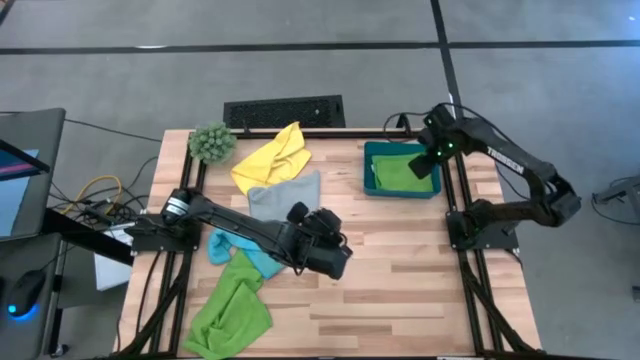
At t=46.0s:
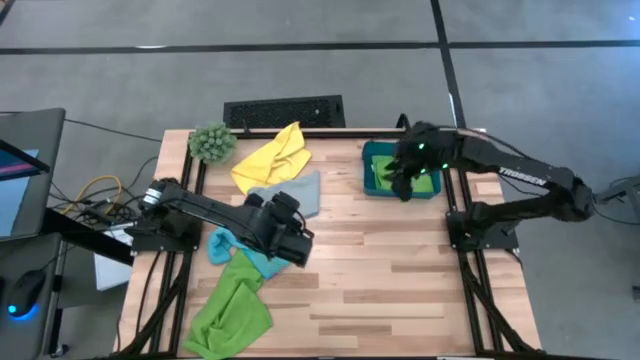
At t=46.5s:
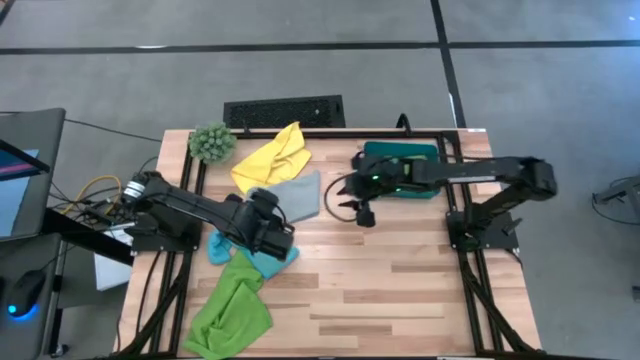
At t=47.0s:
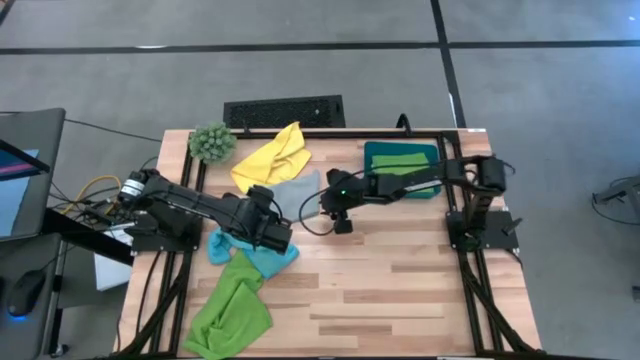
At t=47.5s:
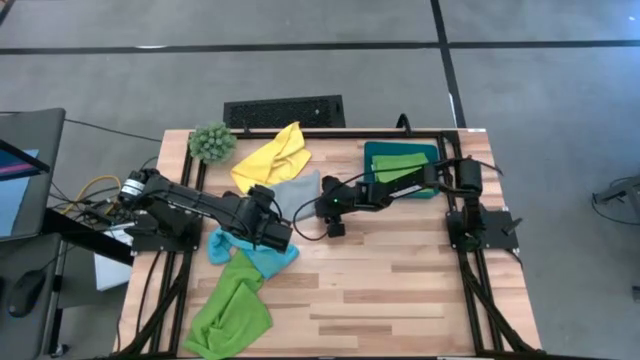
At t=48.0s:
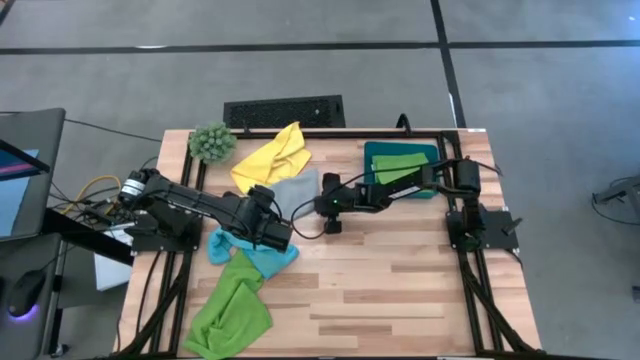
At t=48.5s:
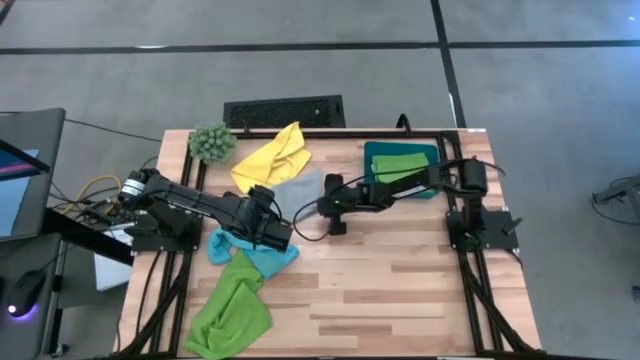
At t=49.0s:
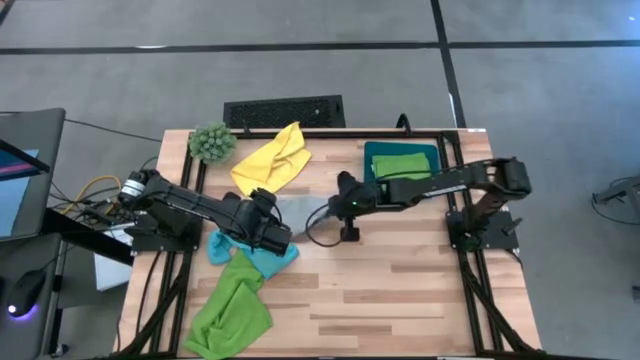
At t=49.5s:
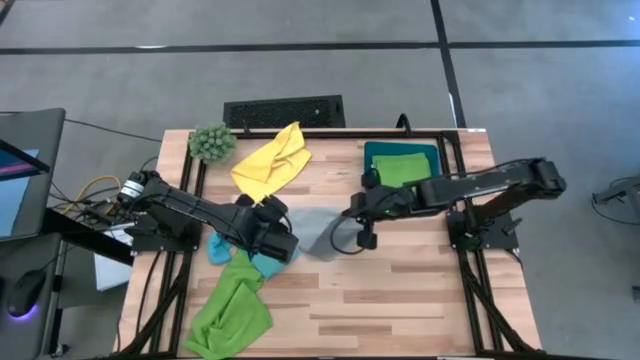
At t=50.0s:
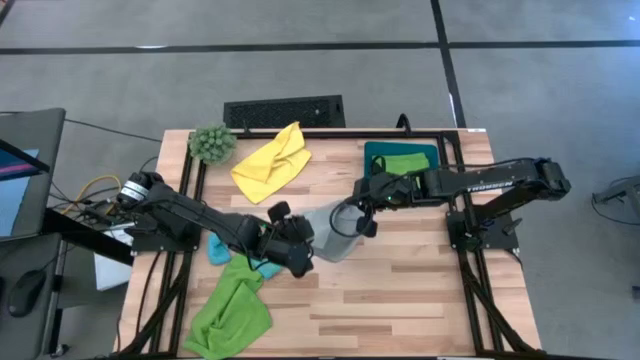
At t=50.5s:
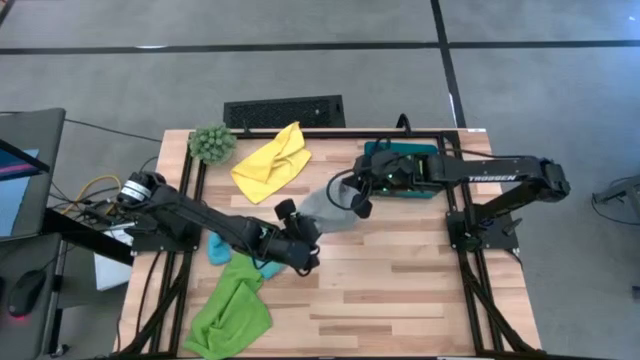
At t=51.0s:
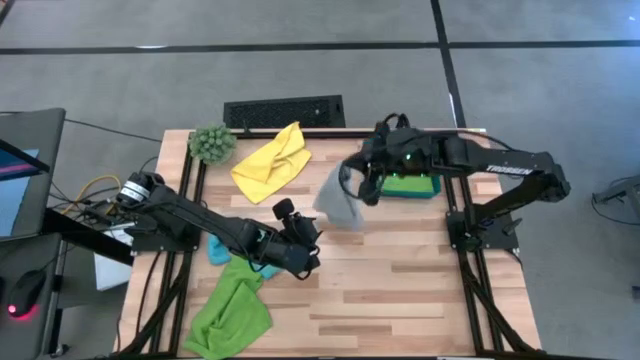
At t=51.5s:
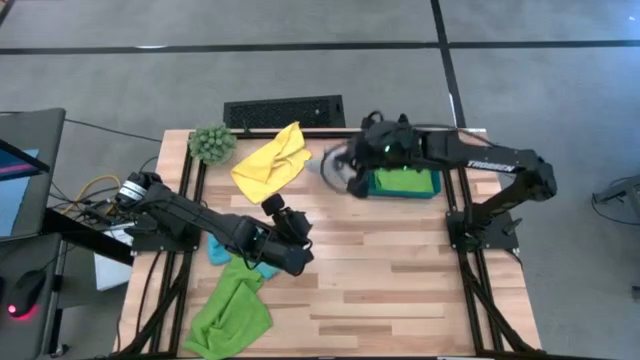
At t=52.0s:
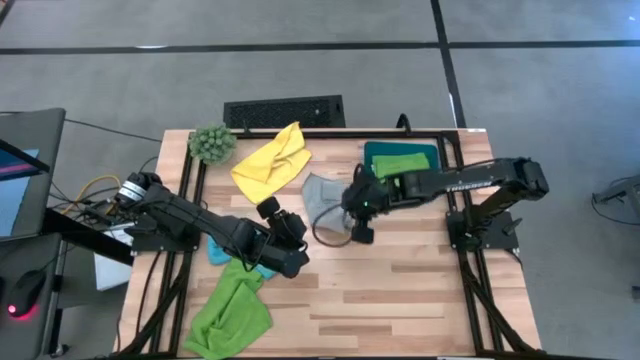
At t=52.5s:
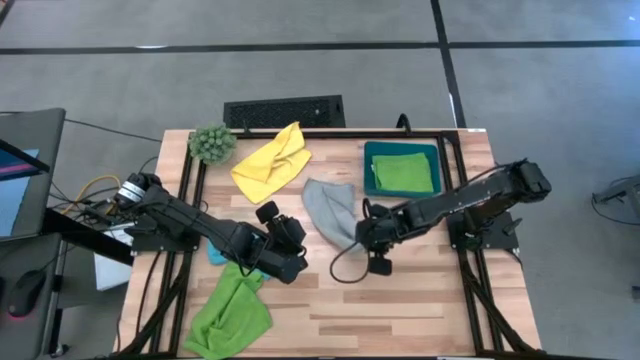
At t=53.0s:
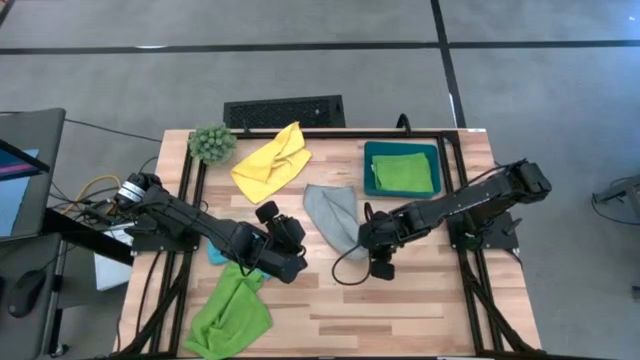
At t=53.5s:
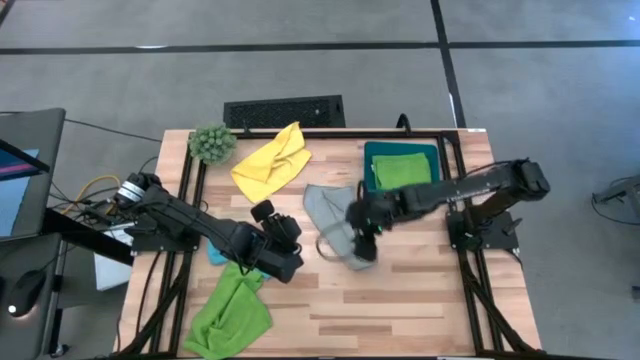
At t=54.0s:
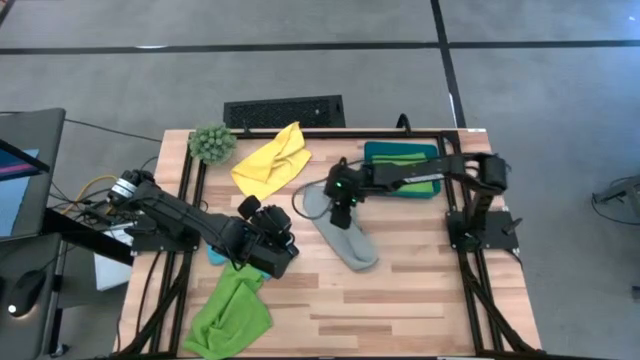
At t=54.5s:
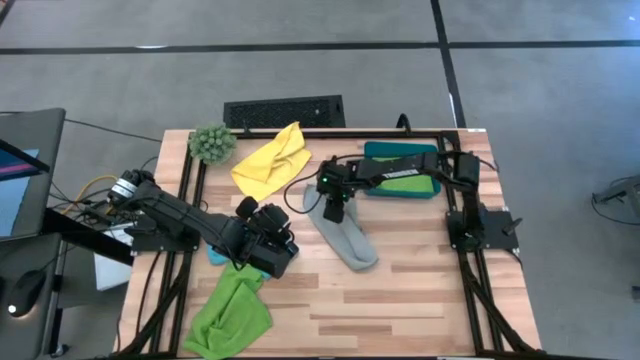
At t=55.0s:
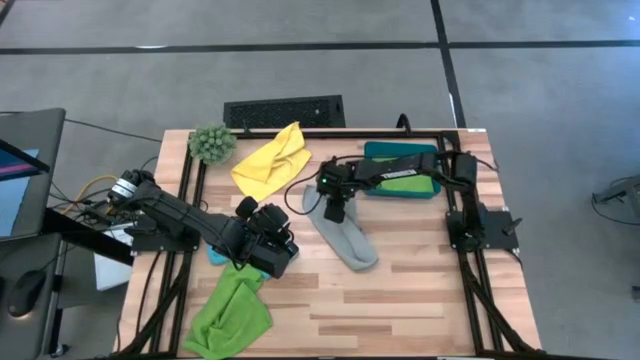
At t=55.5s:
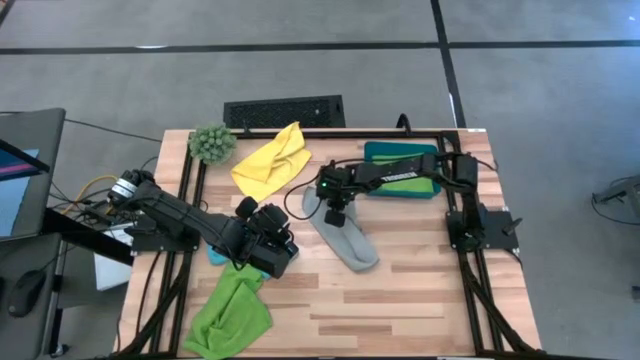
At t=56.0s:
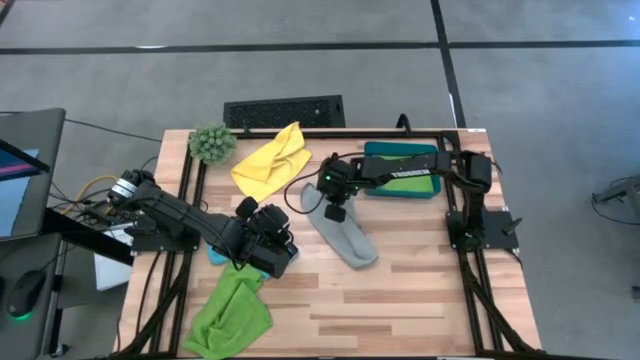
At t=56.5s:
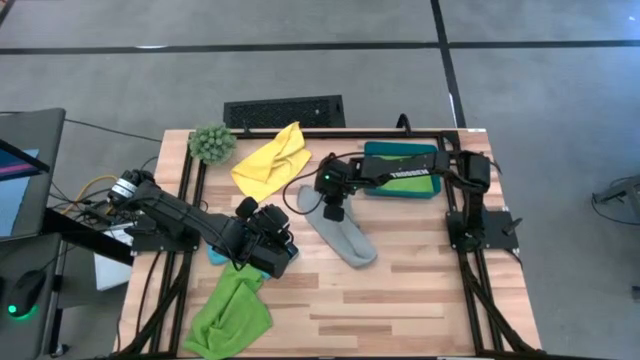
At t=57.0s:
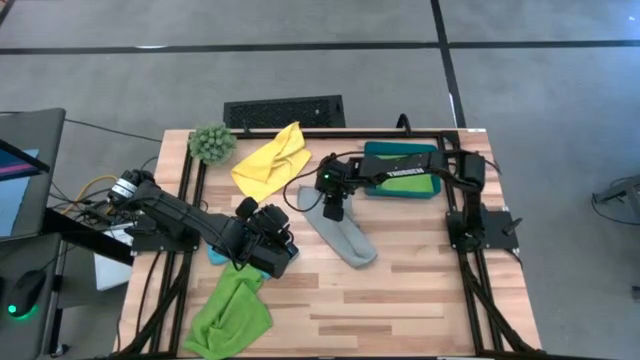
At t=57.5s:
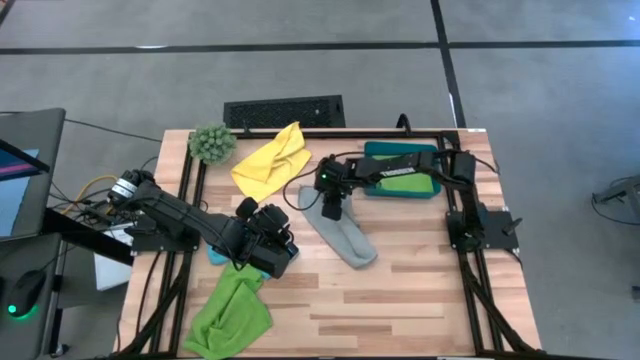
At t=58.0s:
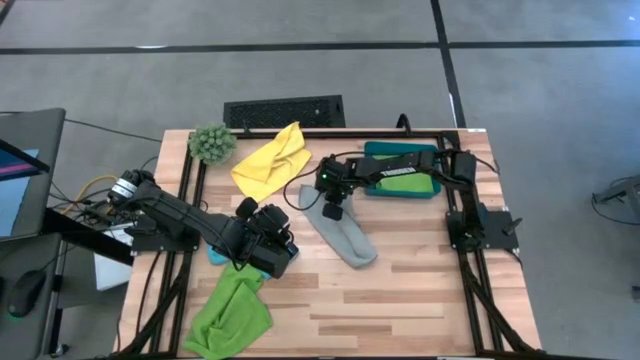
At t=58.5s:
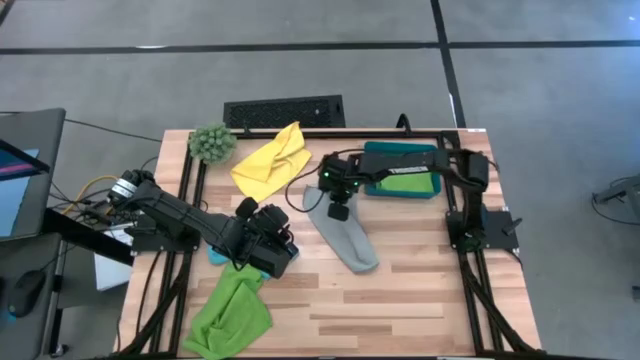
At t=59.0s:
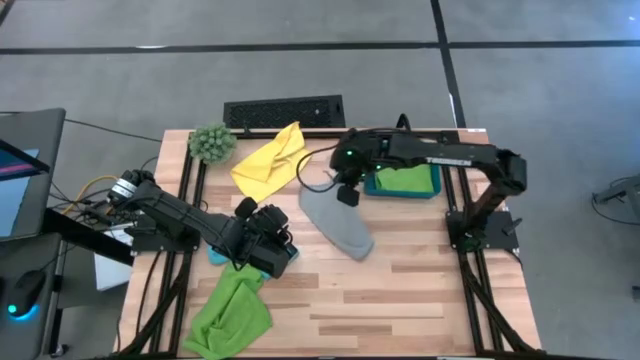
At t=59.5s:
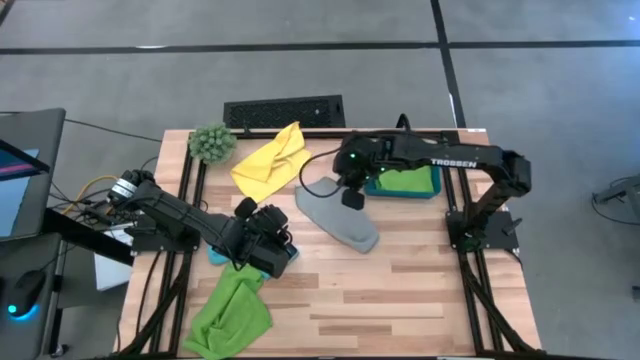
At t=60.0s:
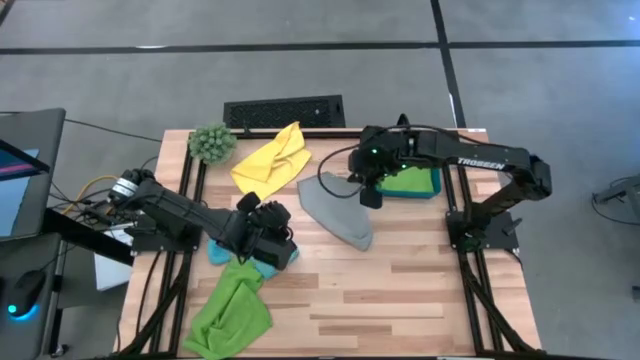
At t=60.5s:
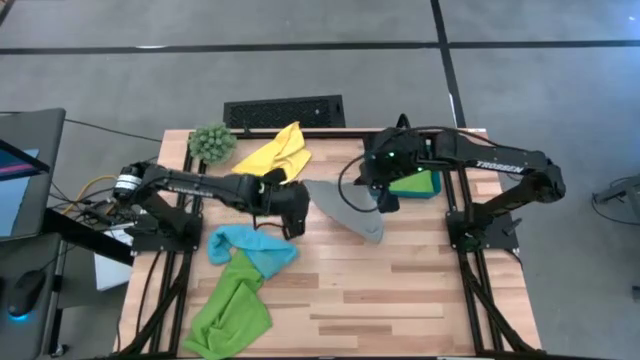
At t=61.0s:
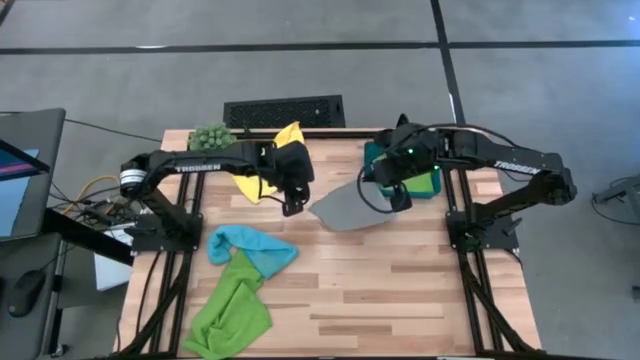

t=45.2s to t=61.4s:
Task: Fold microfiber towels
Fold the dark white microfiber cloth

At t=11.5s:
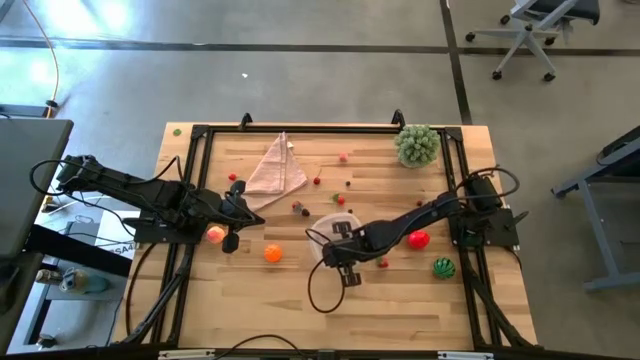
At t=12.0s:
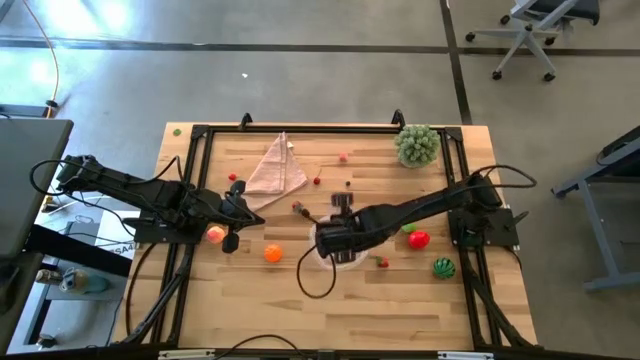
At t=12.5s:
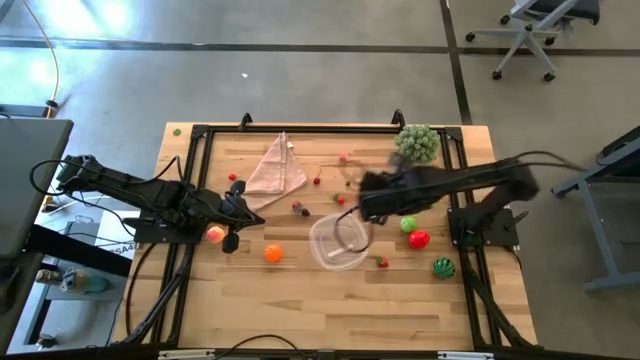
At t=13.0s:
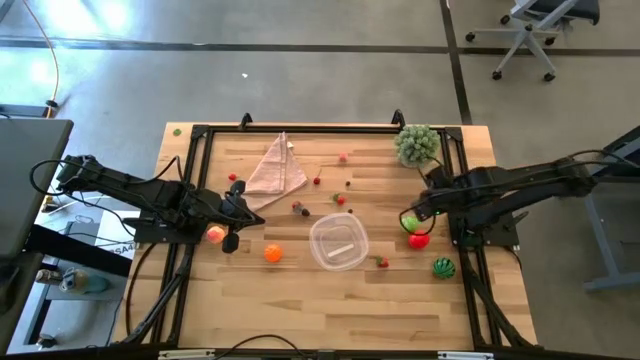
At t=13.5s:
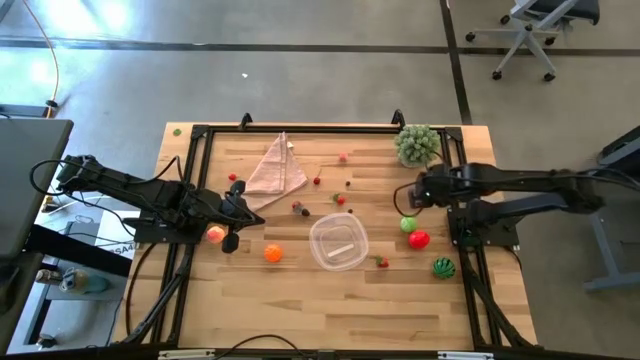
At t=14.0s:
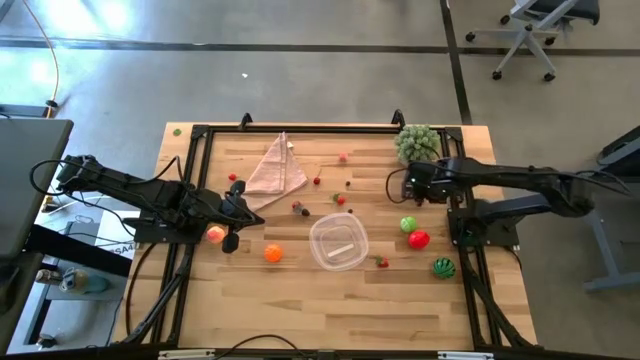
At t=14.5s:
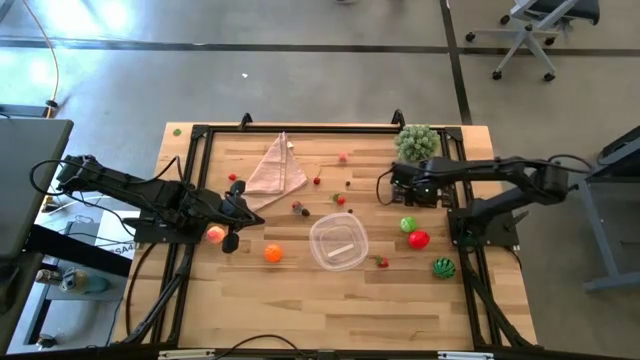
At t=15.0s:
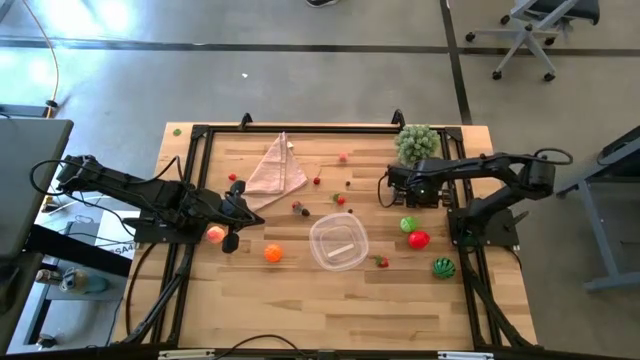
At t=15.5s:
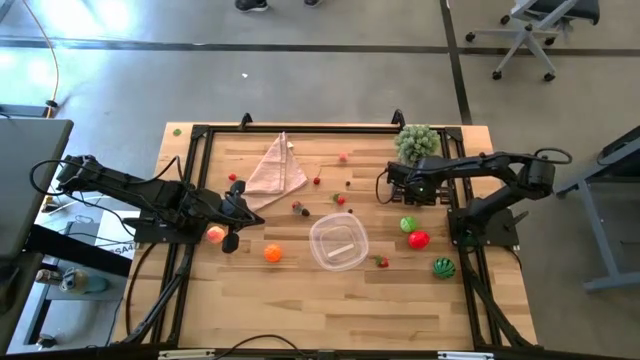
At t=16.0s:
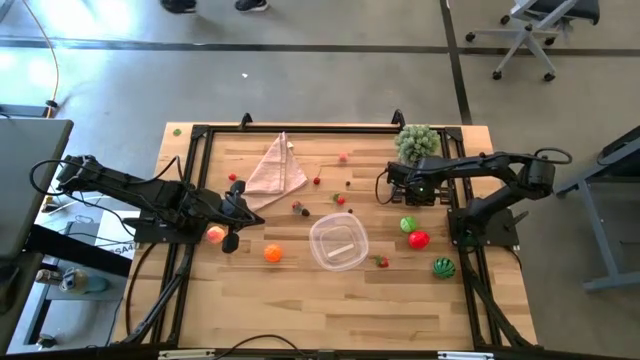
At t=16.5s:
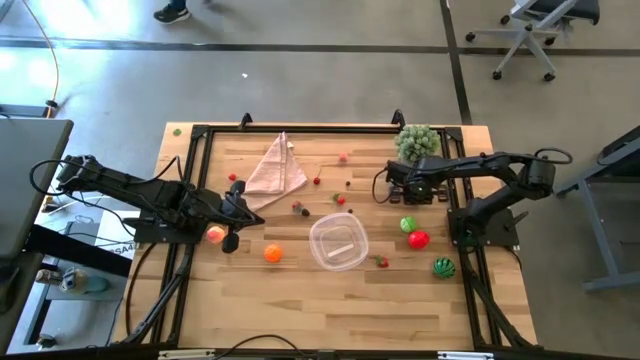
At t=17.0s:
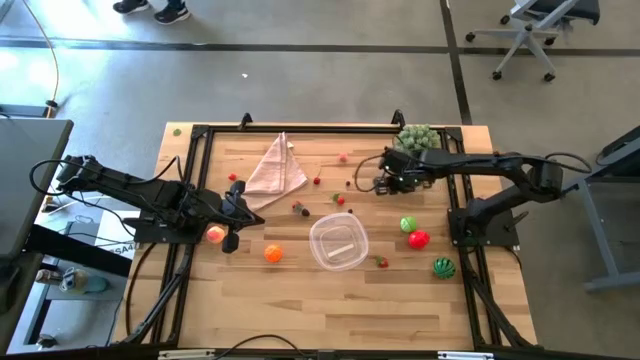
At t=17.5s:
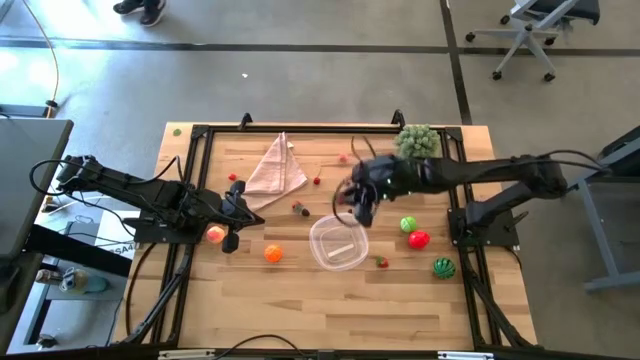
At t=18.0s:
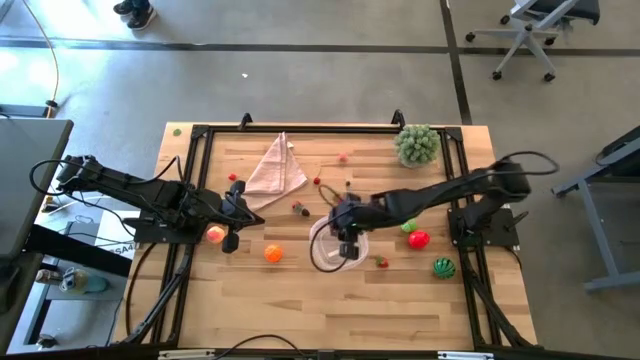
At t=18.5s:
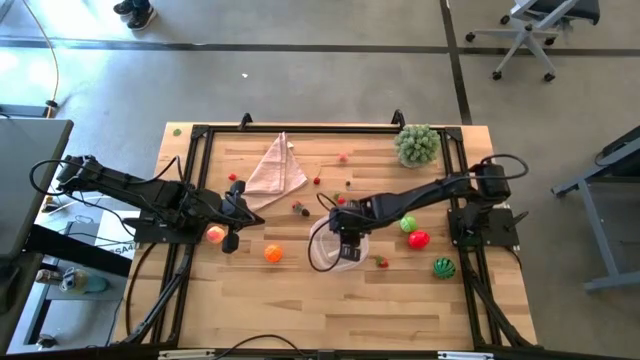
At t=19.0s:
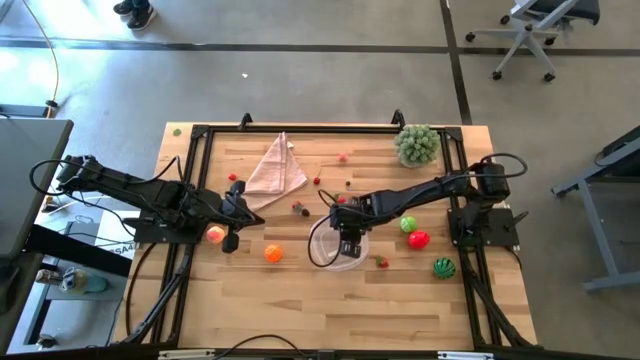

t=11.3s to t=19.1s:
Task: Pick and placing Produce into tupperware
Put the right cherry into the transparent bin
